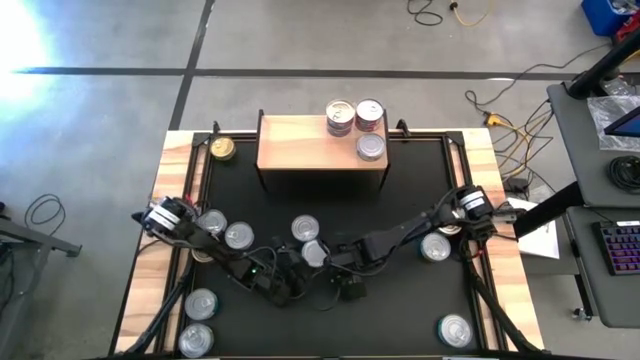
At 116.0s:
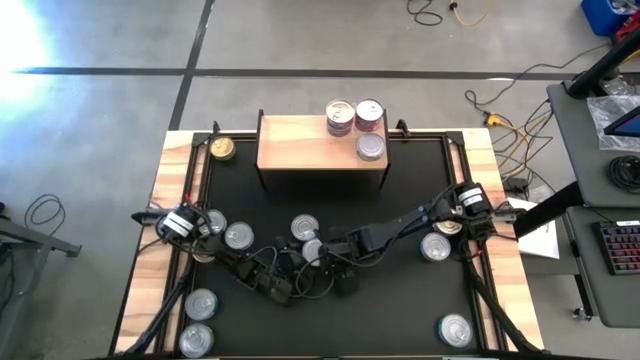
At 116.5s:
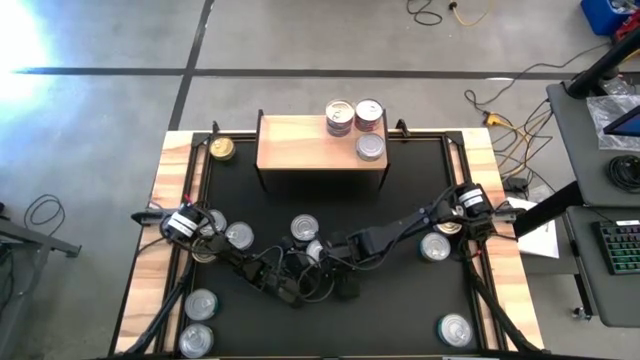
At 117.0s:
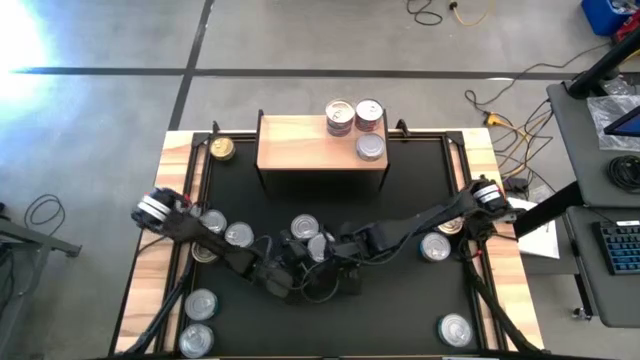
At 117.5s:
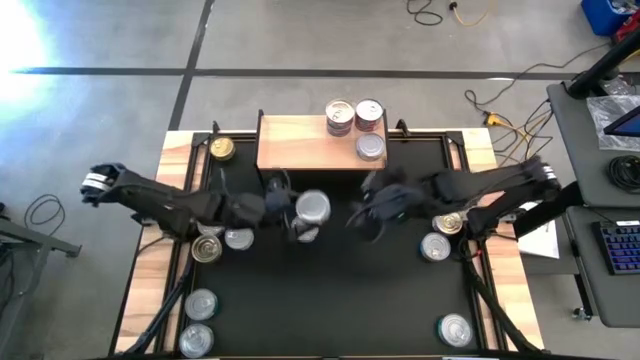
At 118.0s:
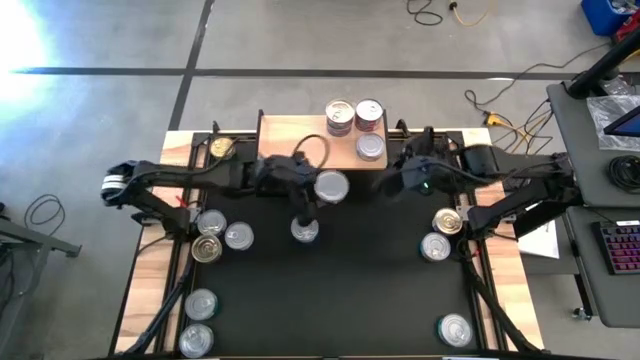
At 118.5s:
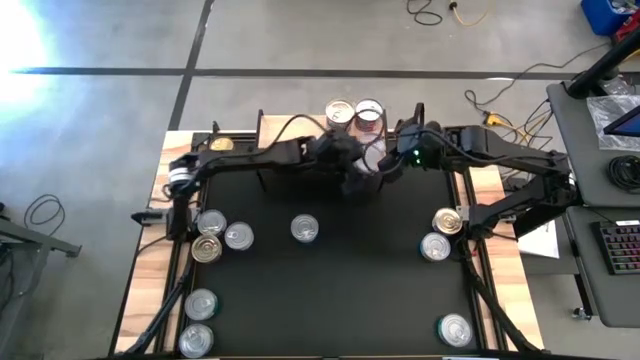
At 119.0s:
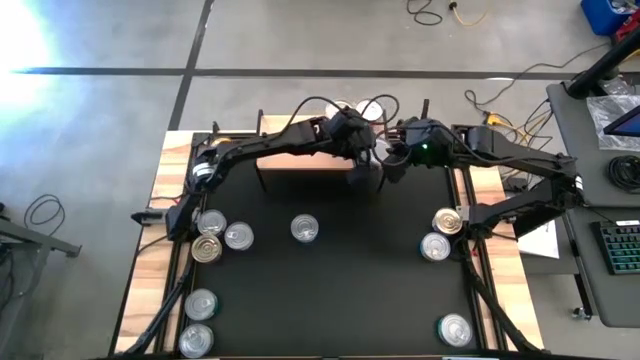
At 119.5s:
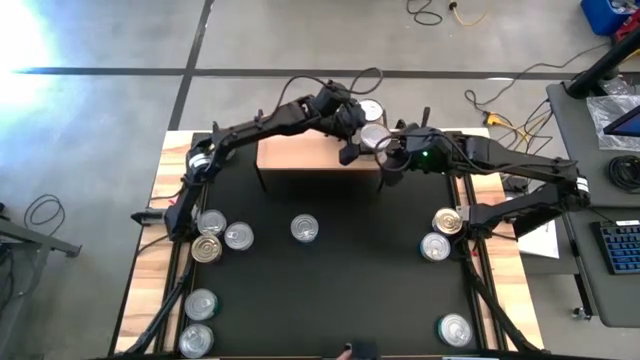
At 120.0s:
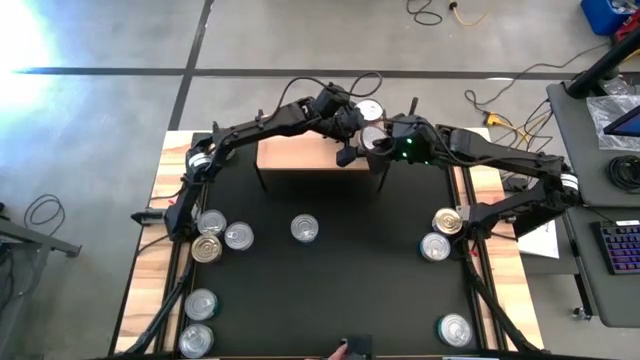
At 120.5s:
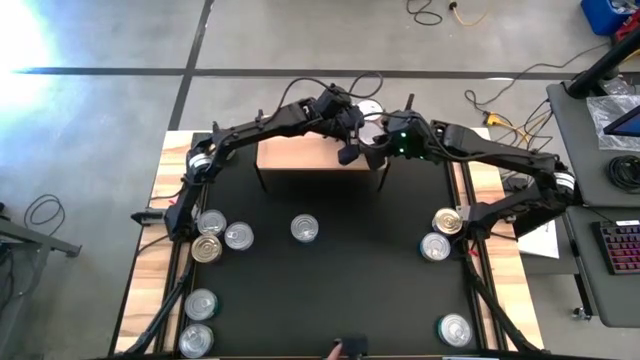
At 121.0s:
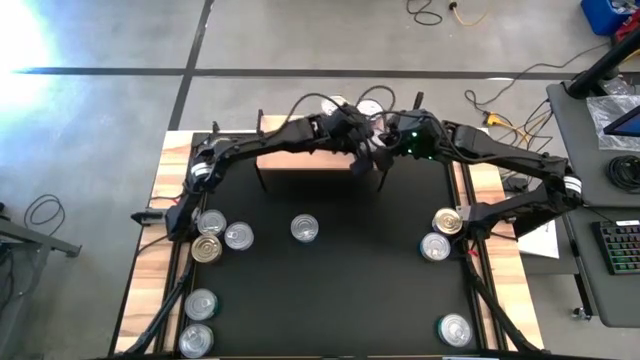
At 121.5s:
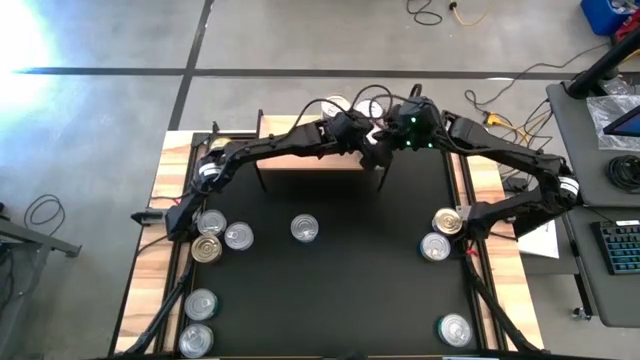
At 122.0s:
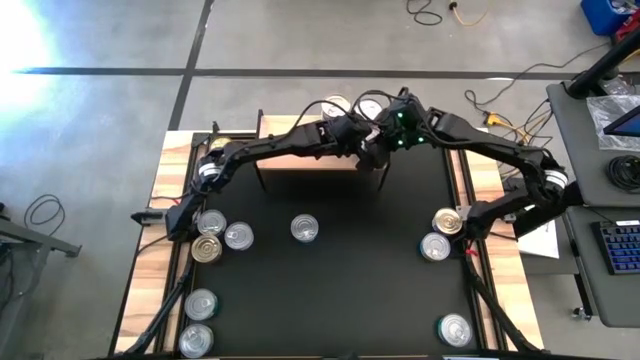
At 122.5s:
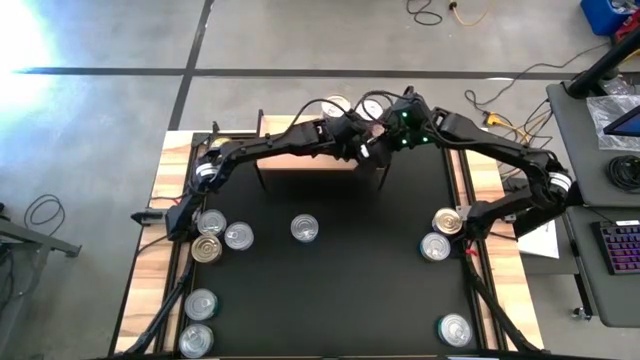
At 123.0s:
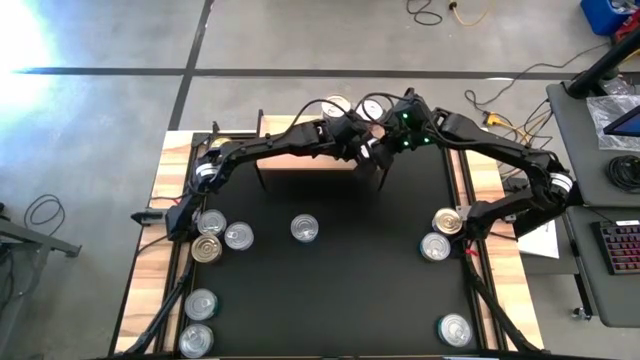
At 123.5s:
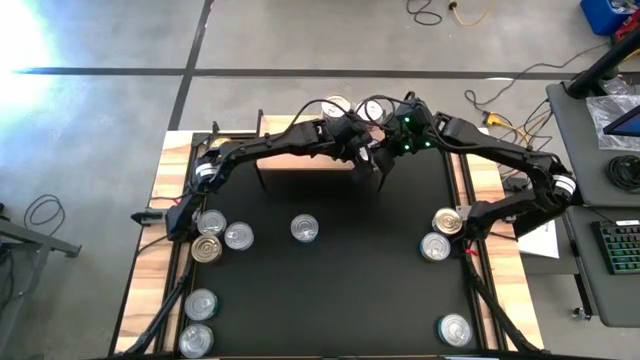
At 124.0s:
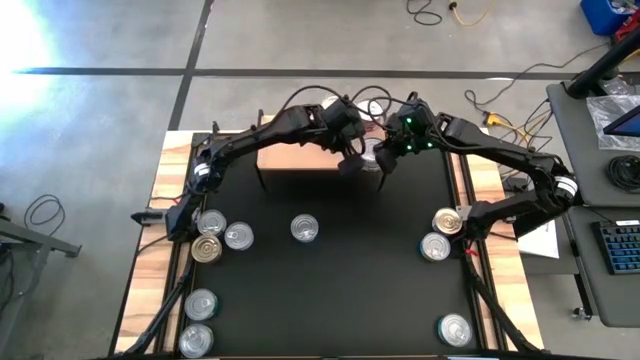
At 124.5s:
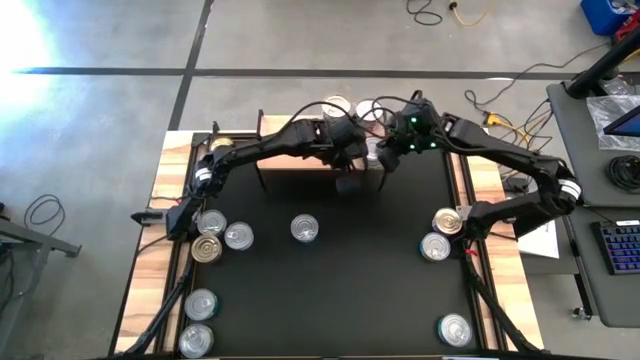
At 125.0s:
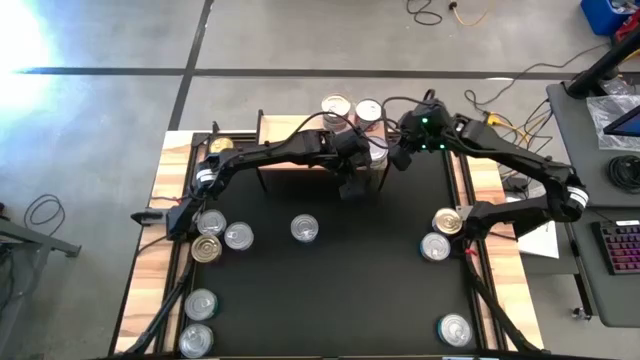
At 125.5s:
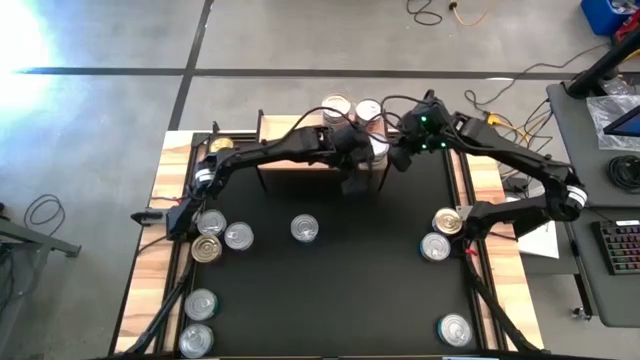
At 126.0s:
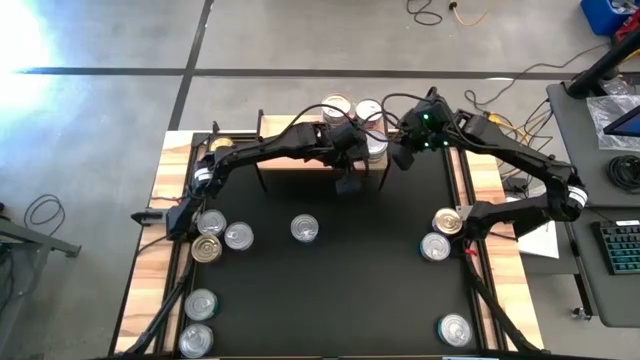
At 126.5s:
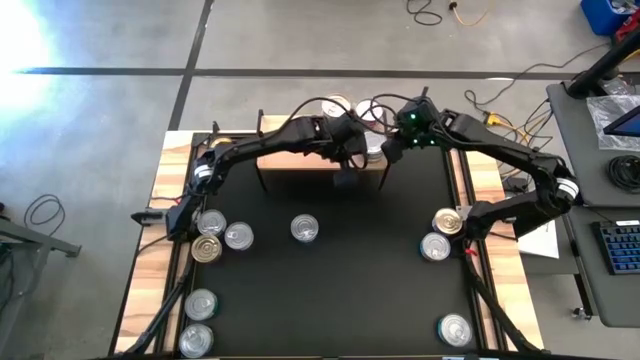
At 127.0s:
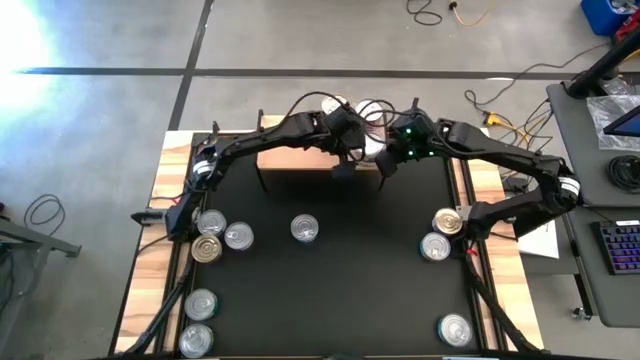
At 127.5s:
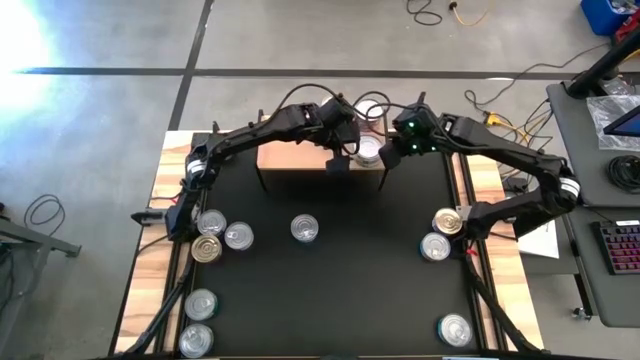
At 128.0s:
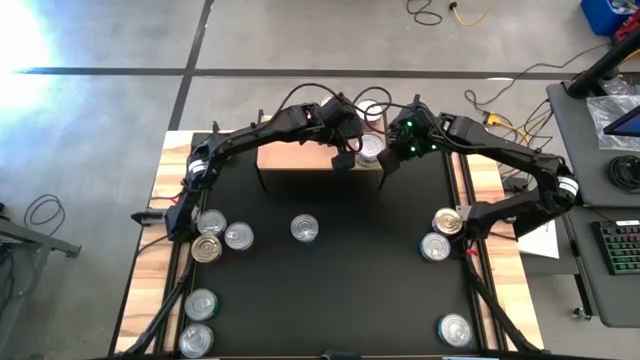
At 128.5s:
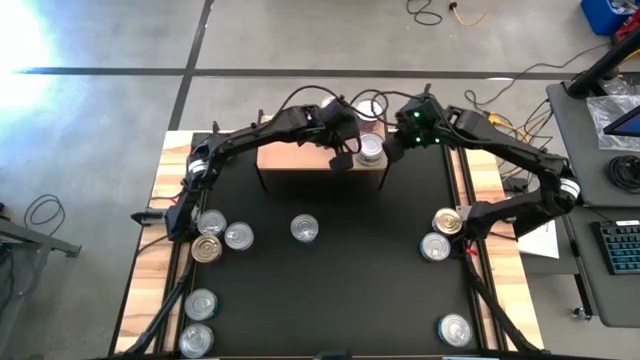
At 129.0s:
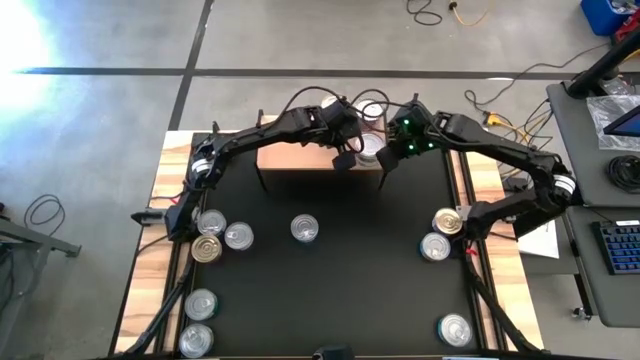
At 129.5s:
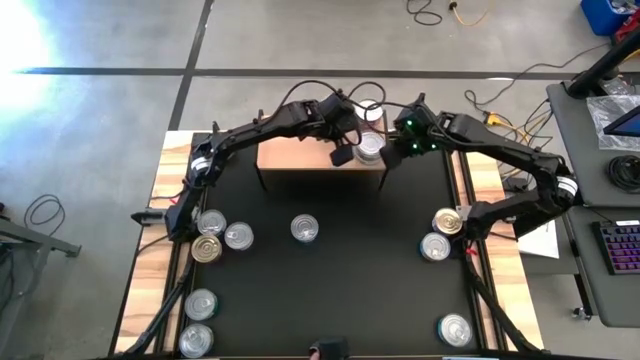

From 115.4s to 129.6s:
Task: Stack canned seafood by type on shelf
Stack the white-green tuna can on top of the other green tuna can on the shelf

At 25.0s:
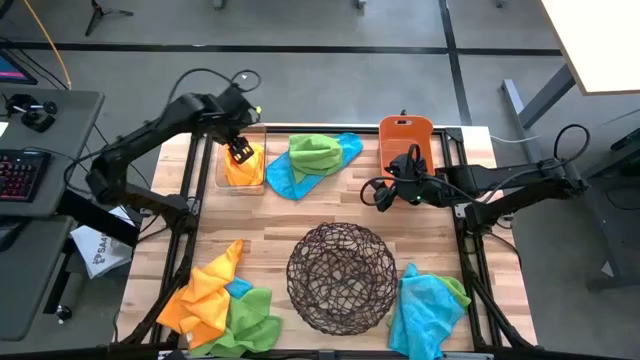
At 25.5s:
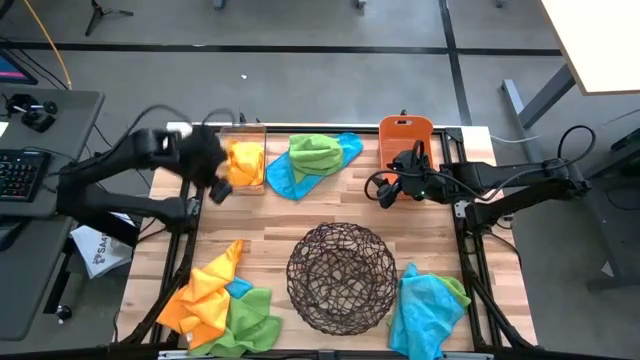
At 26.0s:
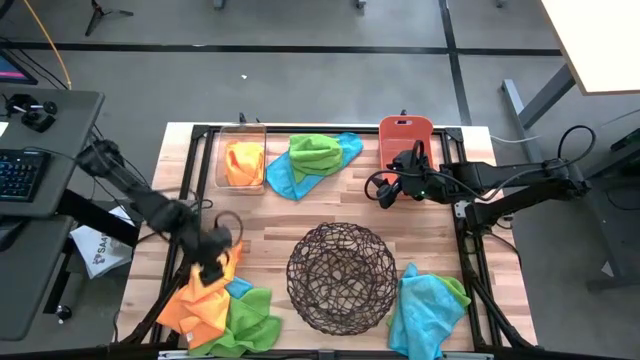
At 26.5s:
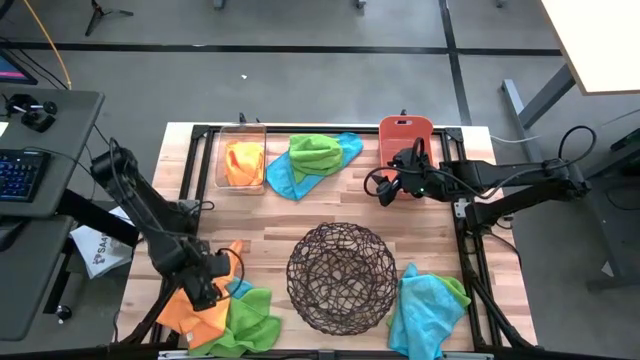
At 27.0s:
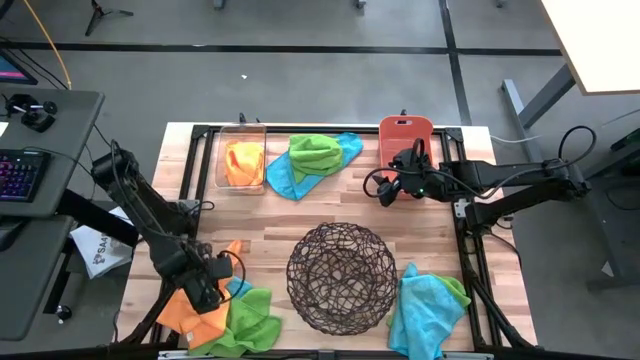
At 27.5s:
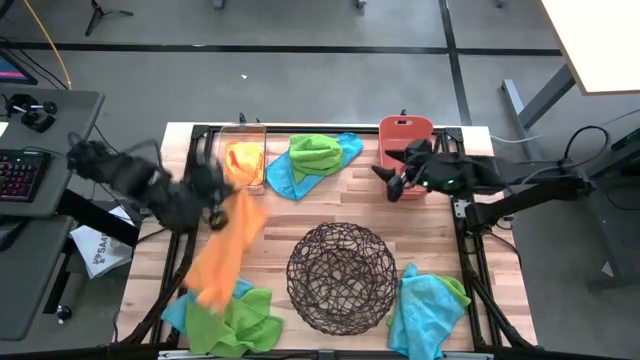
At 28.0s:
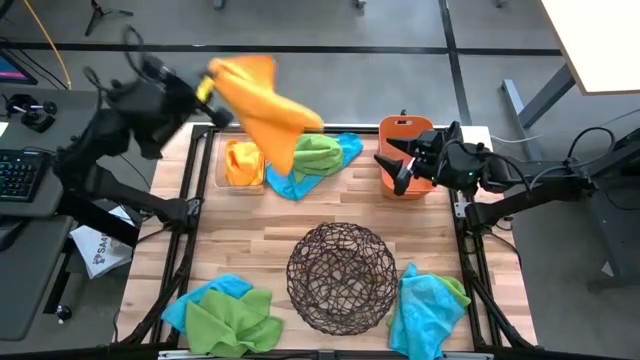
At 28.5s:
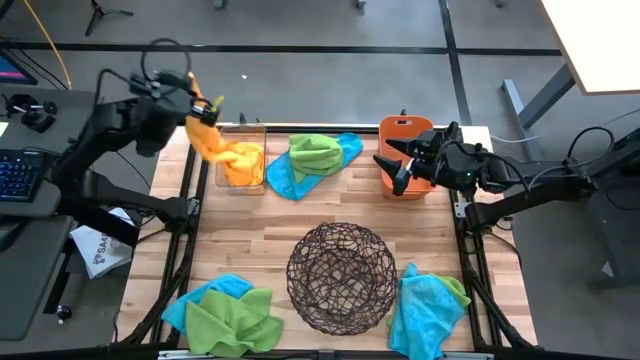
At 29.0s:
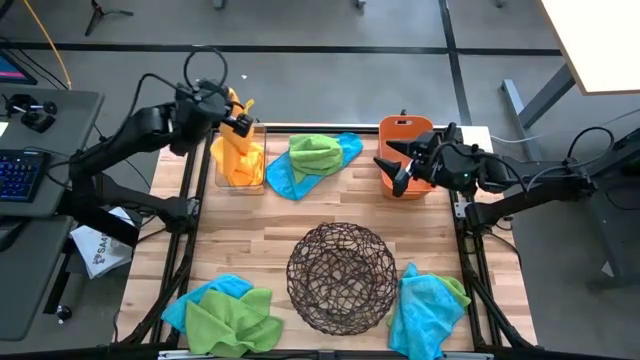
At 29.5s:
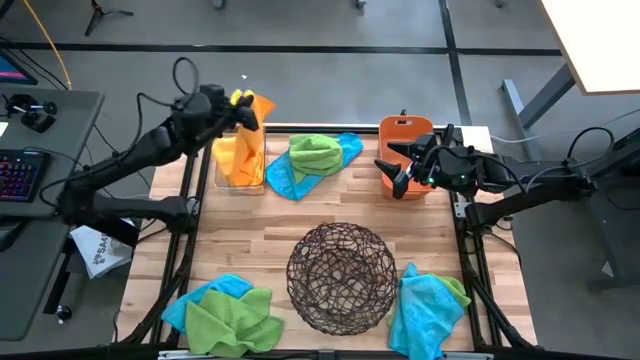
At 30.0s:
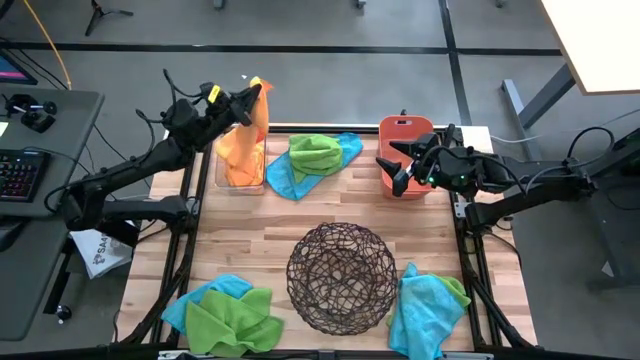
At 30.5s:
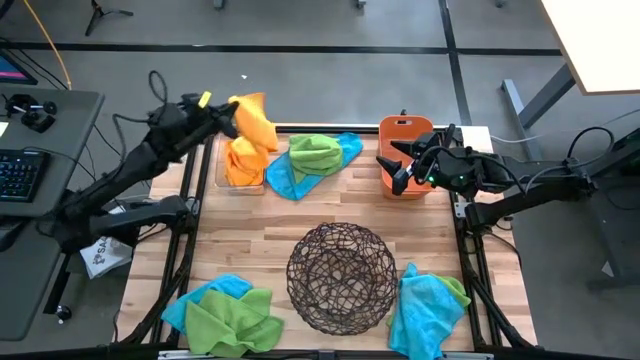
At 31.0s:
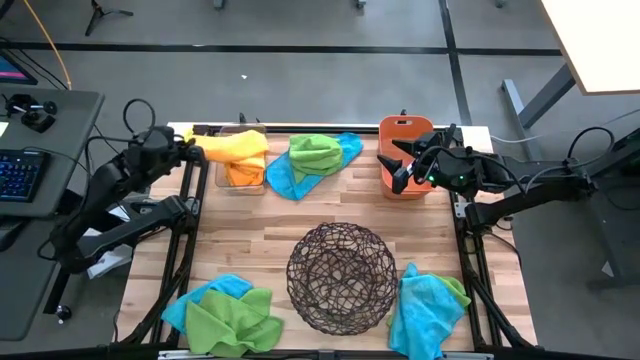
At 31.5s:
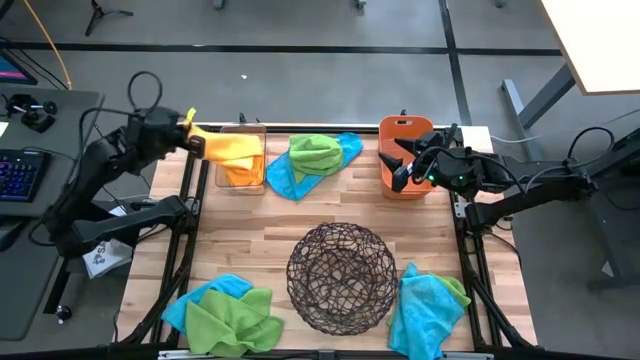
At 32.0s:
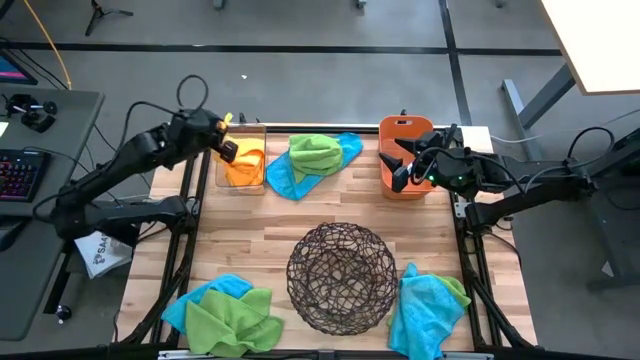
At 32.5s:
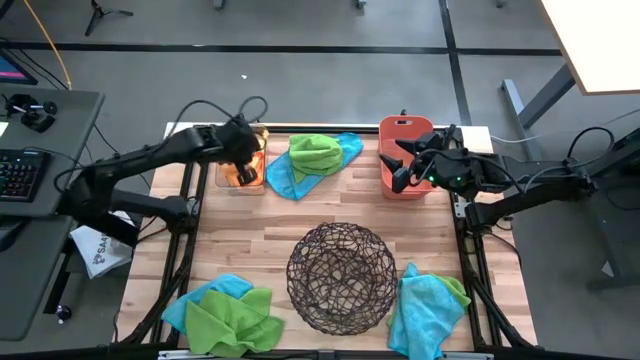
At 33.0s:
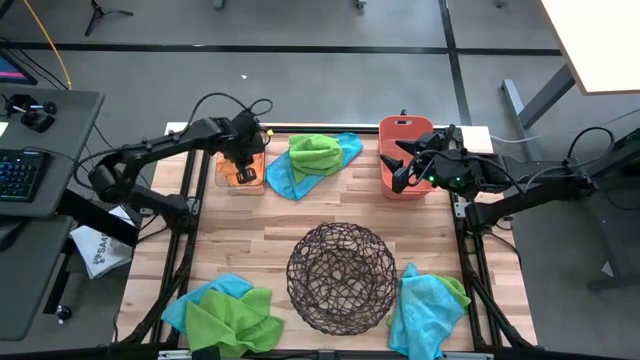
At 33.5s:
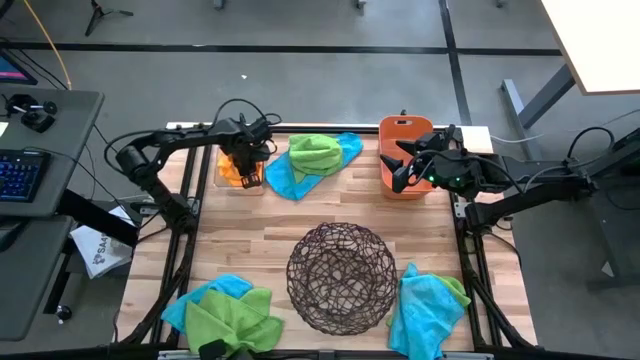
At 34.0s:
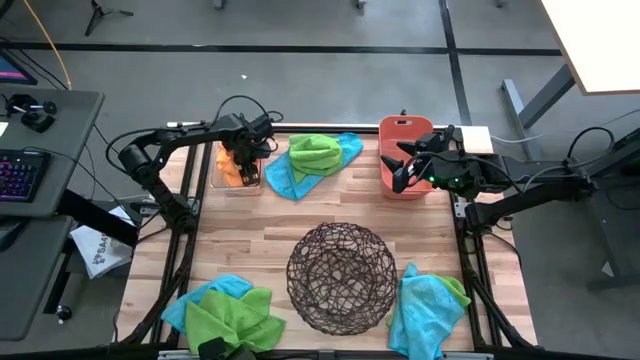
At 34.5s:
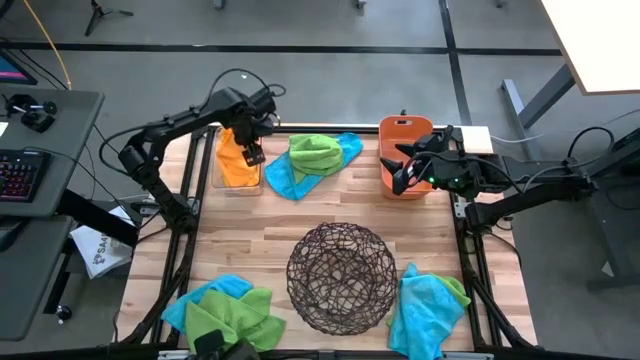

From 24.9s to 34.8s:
Task: Sort microfiber towel by color & place in baskets
Put the orange towel into the transparent bin
